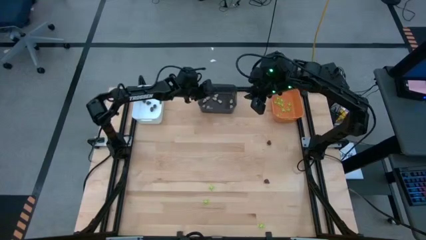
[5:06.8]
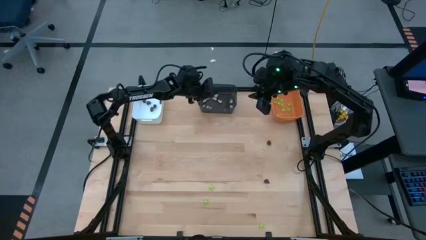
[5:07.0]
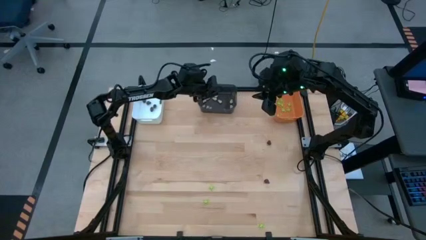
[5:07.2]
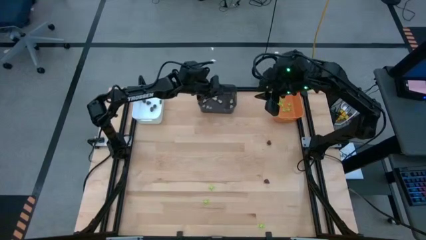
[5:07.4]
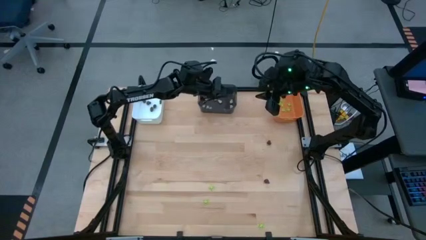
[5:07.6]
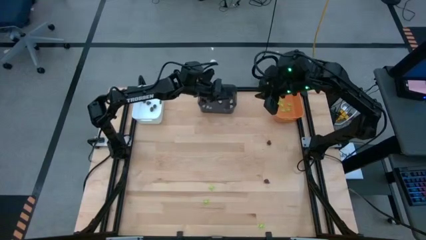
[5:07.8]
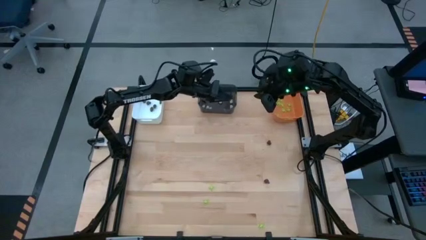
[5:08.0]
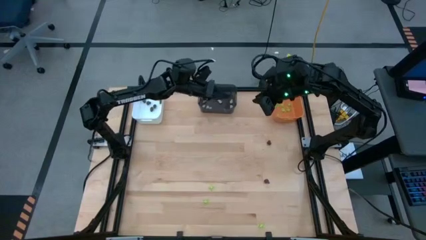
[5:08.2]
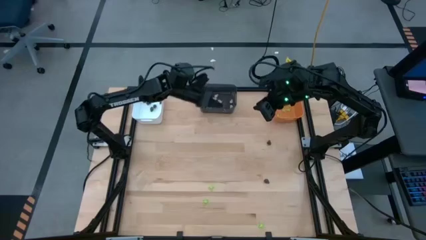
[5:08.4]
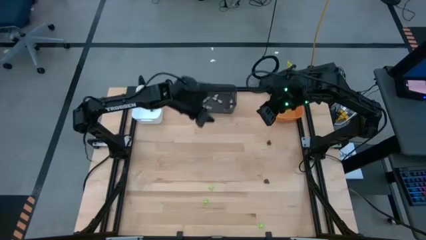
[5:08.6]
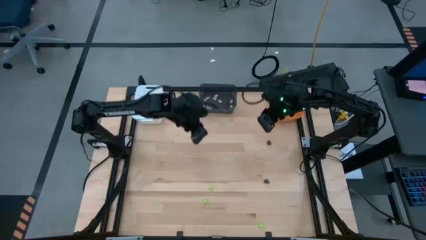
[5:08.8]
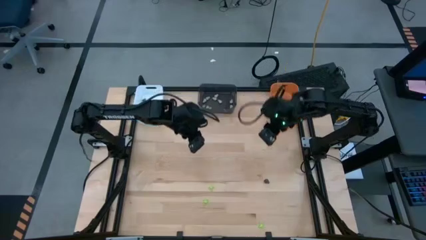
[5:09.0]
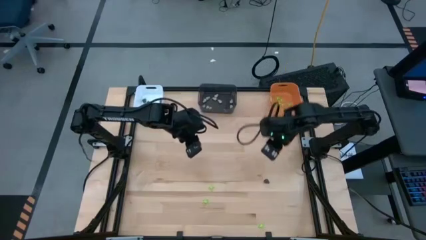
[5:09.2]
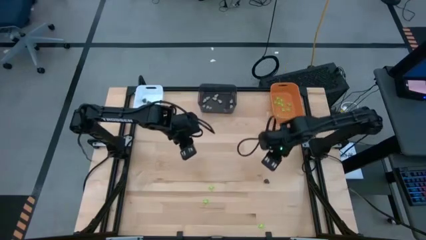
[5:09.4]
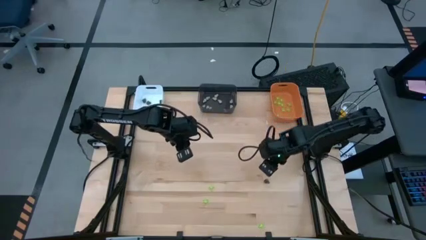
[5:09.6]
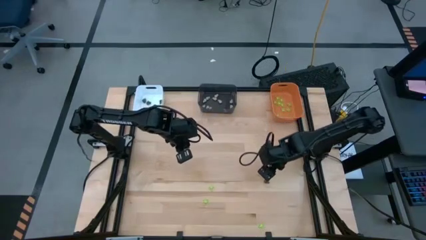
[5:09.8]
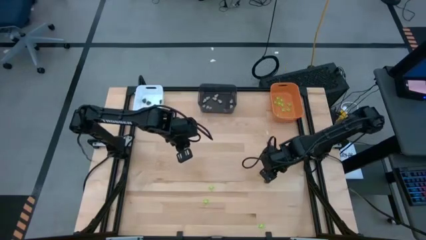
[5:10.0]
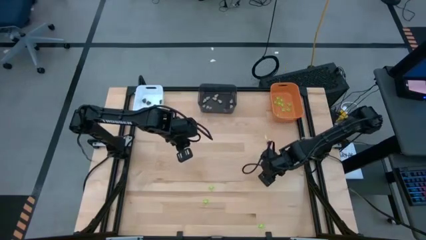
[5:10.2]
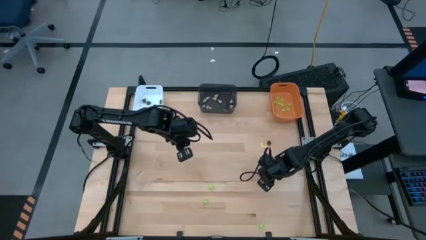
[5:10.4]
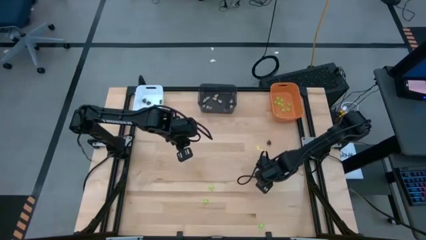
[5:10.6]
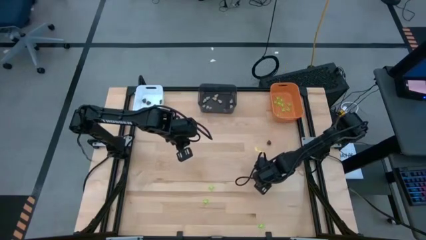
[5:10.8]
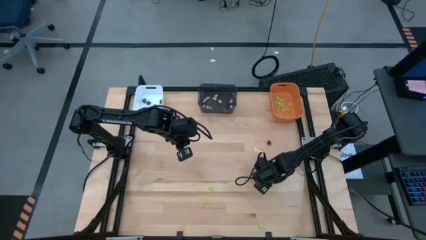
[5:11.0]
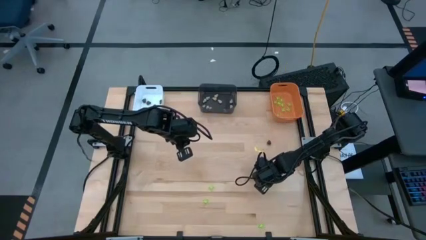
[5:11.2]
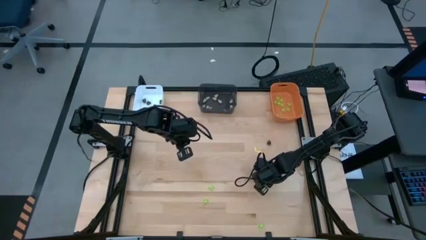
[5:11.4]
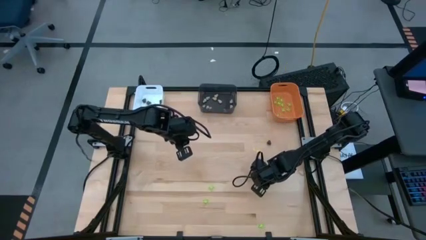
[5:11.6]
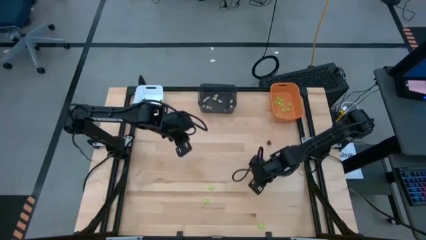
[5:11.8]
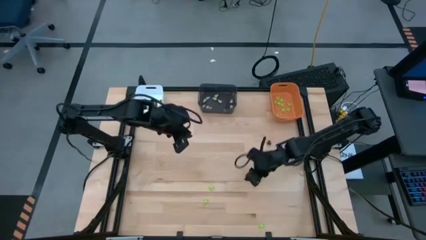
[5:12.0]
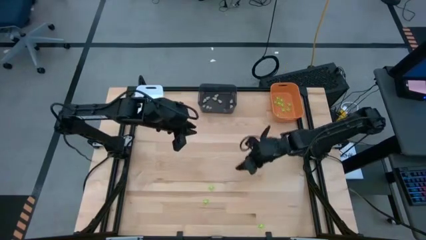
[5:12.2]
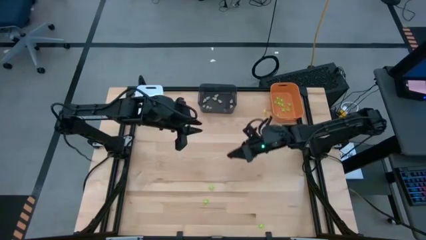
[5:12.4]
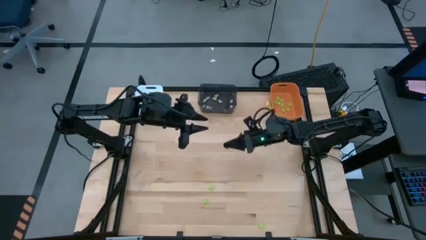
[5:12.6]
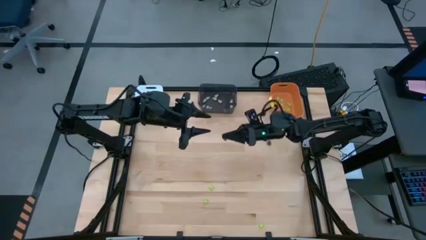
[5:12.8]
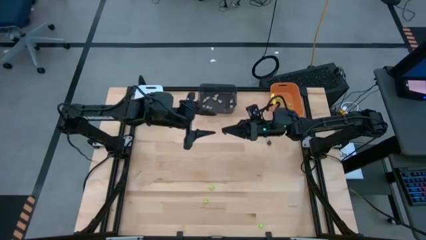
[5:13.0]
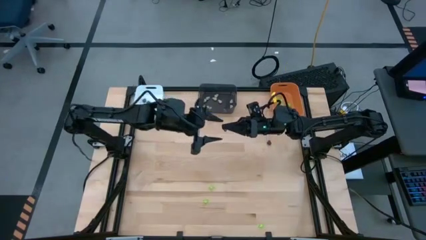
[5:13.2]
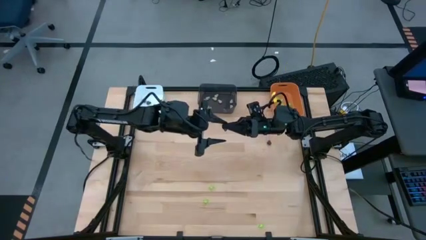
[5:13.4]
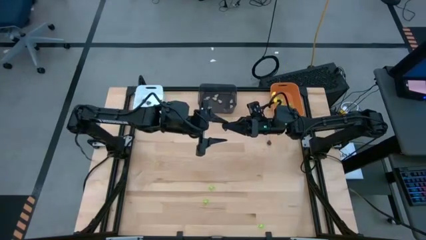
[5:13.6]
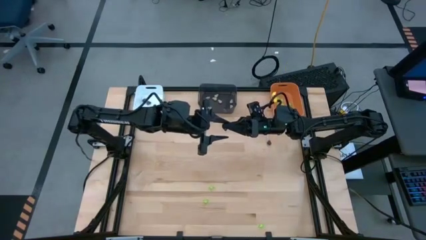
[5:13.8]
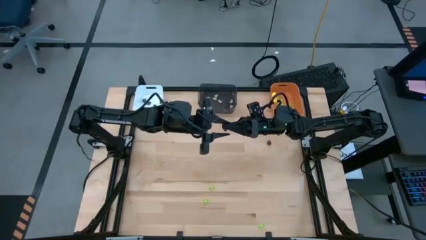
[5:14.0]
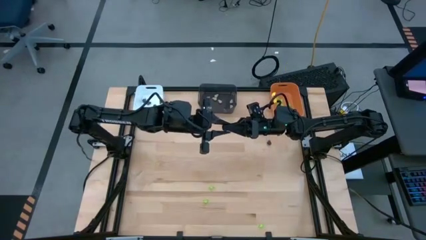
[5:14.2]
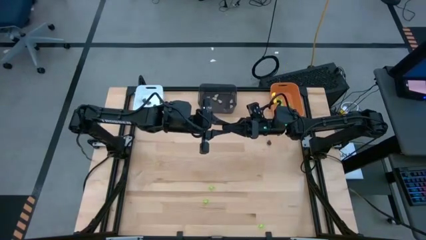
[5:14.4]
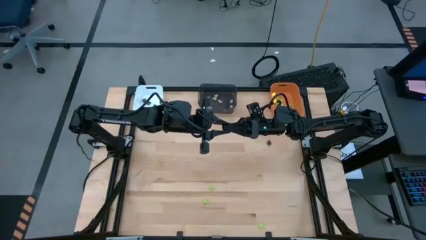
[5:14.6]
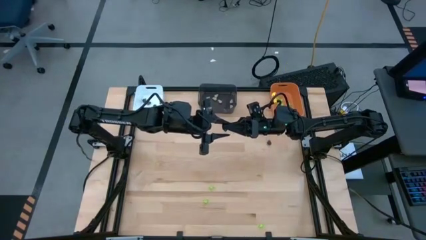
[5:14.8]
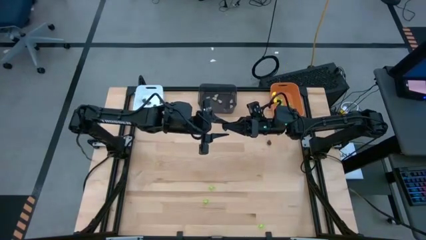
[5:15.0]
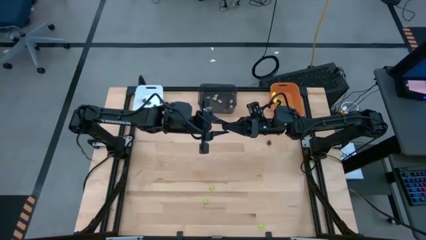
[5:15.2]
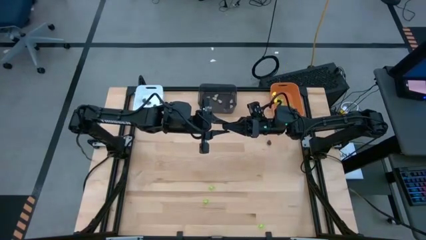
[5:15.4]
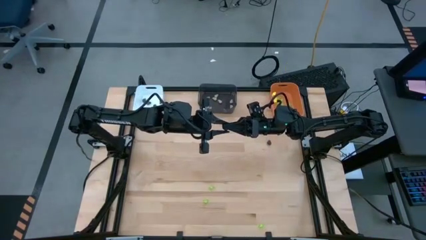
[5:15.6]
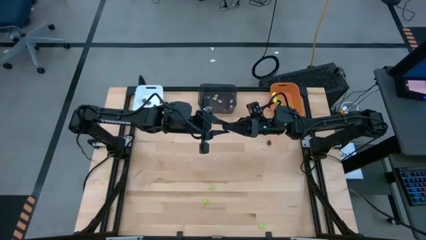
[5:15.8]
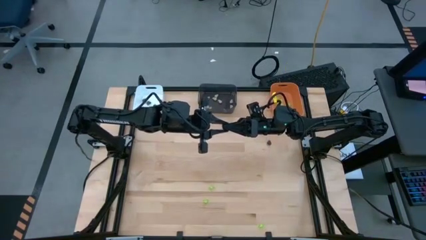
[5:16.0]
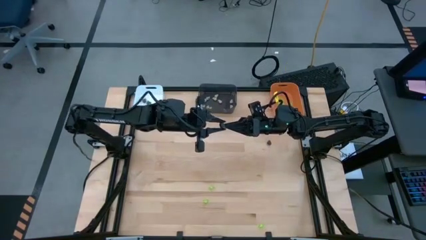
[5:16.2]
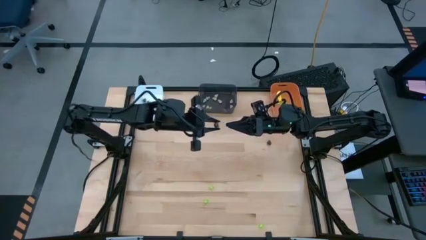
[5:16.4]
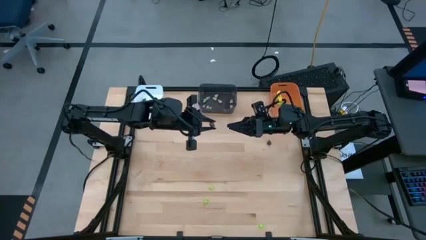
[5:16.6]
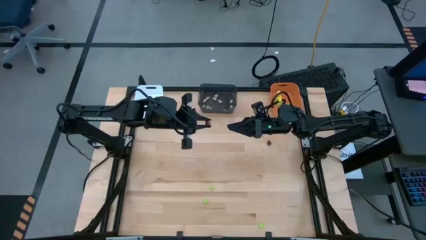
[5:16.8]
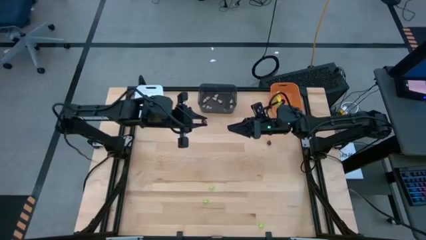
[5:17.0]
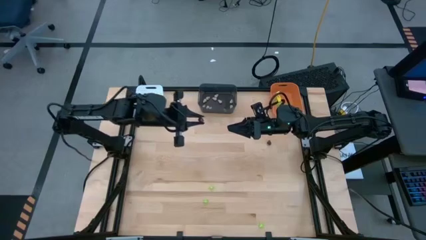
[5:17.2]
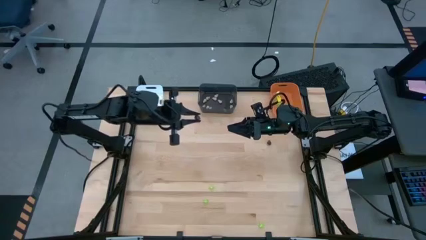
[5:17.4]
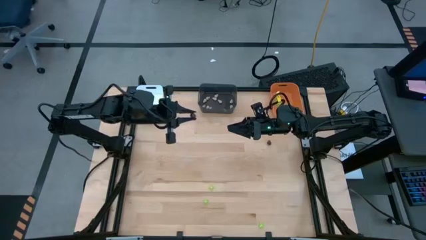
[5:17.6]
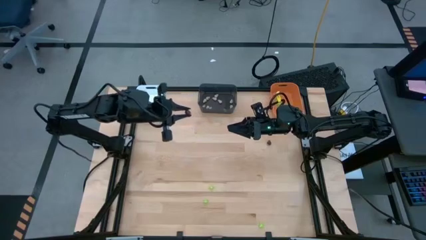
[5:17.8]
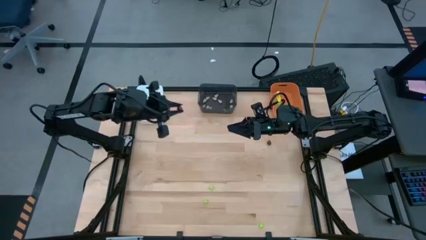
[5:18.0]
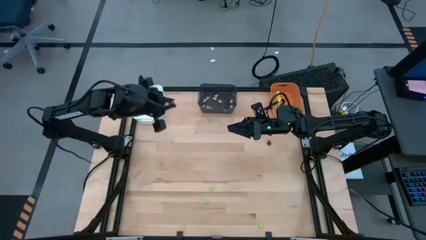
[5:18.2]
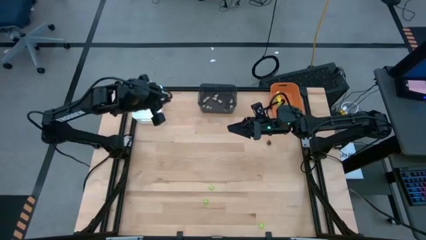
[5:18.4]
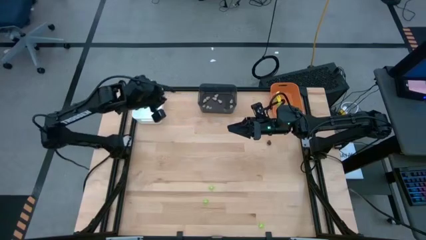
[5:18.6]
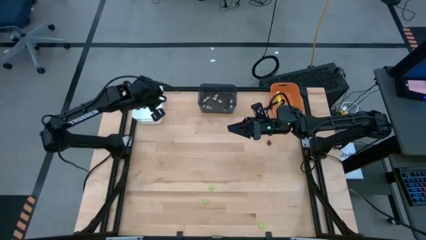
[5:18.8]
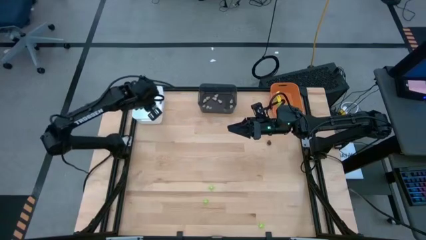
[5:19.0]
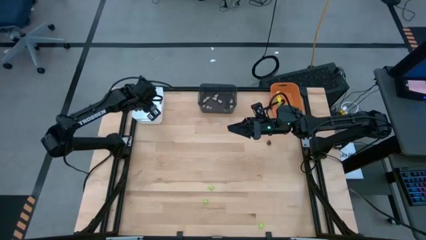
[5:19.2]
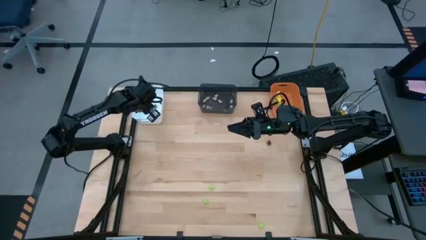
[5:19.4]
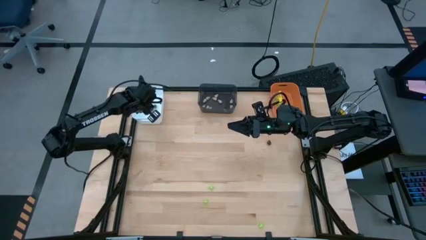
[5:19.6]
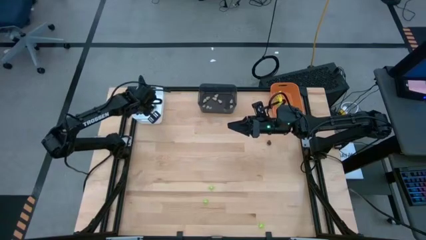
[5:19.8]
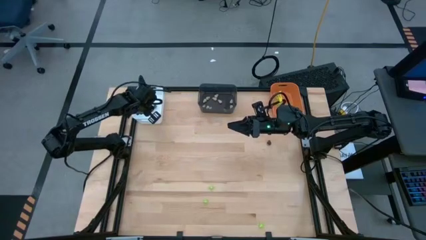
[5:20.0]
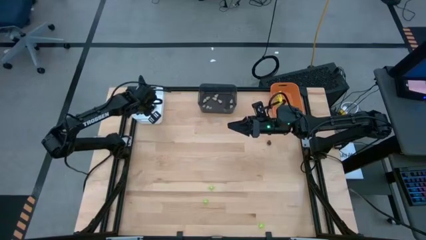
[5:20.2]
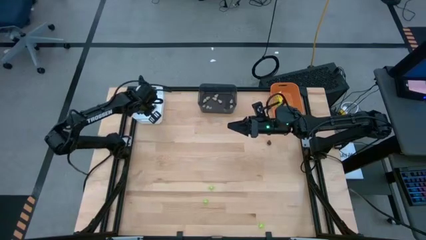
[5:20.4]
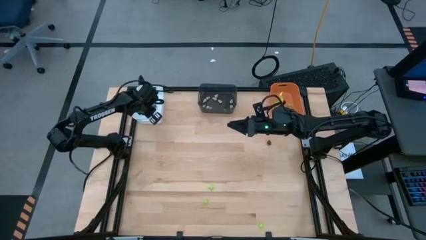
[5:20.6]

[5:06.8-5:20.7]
Task: Sort Halloween decoration
Put the black toy skull into the white bin

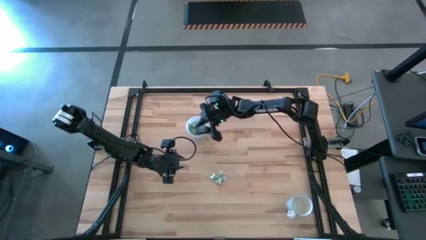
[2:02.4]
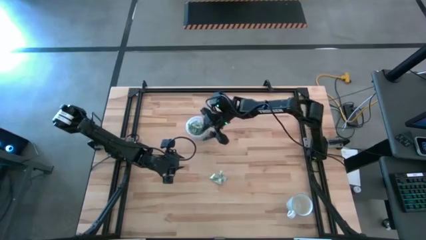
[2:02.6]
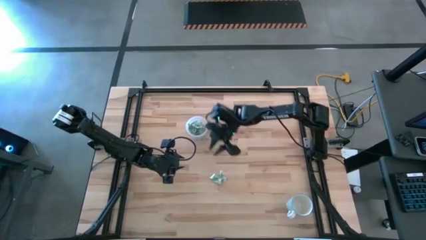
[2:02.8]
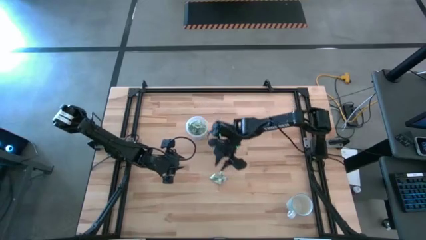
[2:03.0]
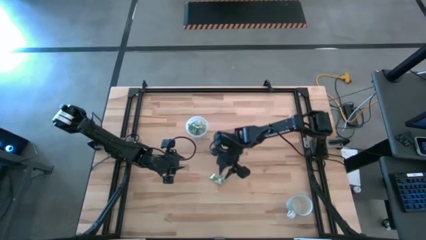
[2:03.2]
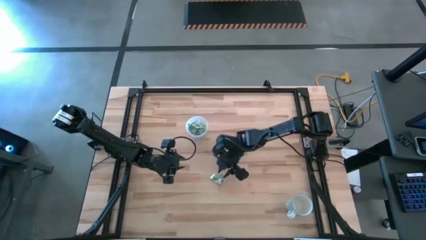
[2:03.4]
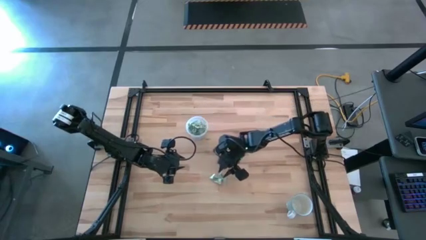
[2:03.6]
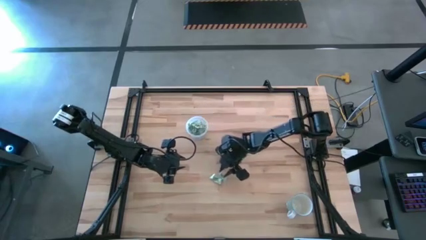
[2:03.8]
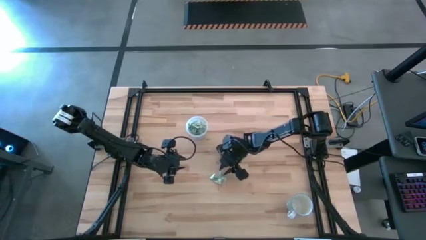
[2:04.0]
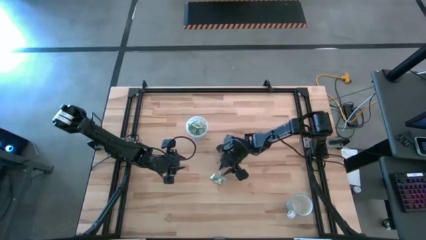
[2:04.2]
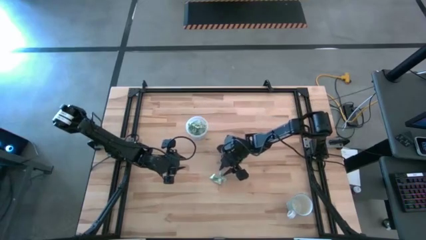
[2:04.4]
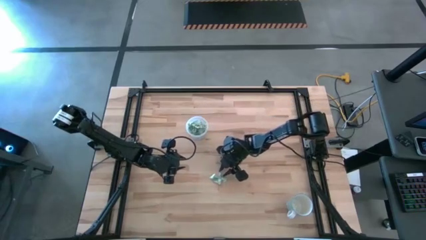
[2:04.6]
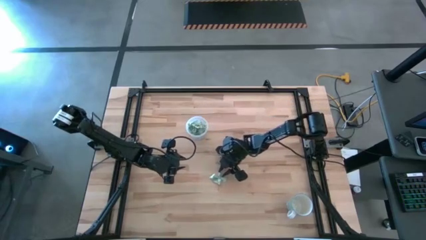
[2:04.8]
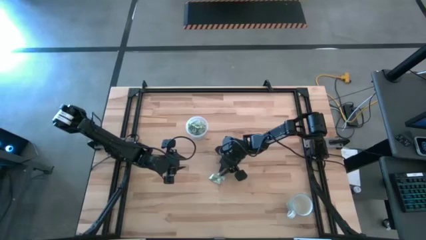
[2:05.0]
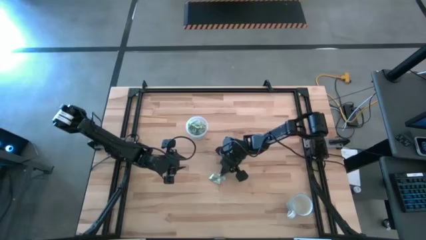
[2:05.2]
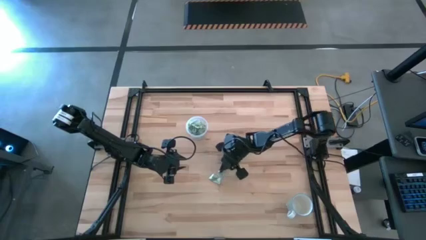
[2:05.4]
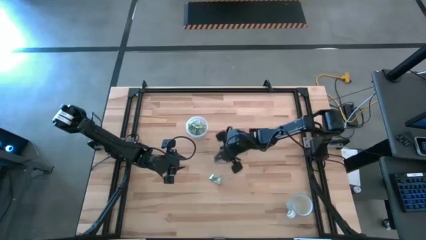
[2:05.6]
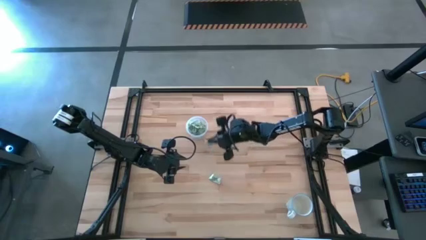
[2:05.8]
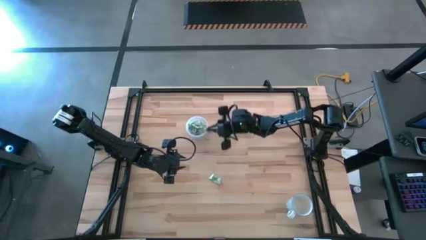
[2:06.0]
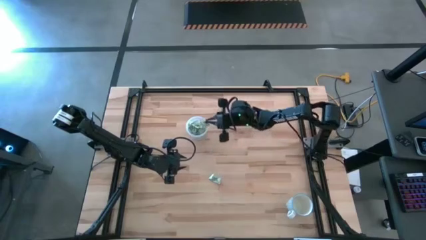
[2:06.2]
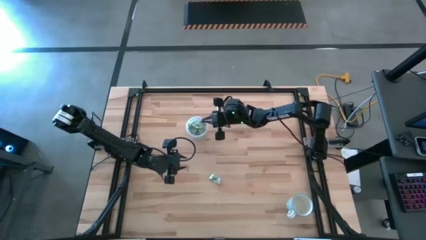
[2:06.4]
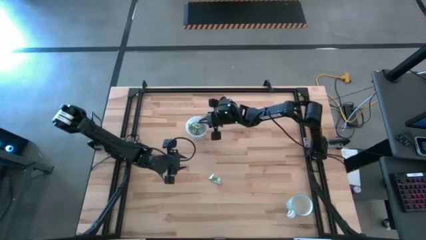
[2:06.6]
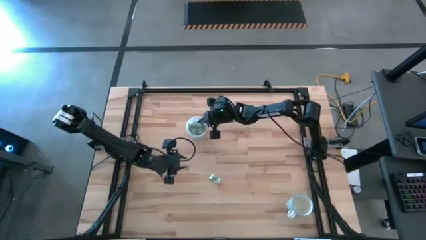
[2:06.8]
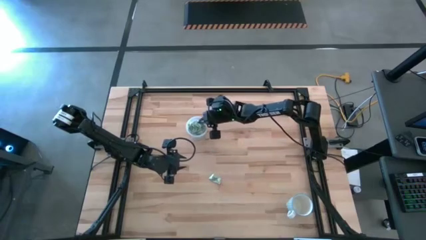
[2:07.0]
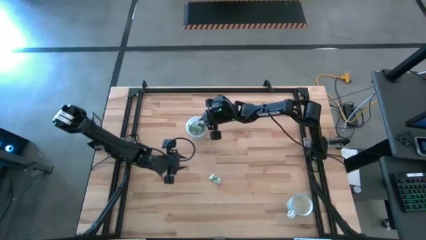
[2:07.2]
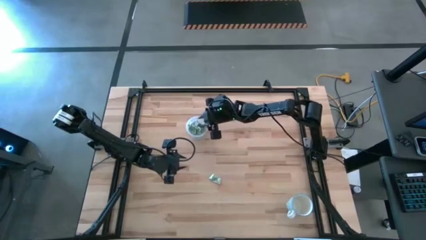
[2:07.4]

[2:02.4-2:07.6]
Task: Pick and place Stevia / Truvia into bins
Put the stevia packet into the transparent container
